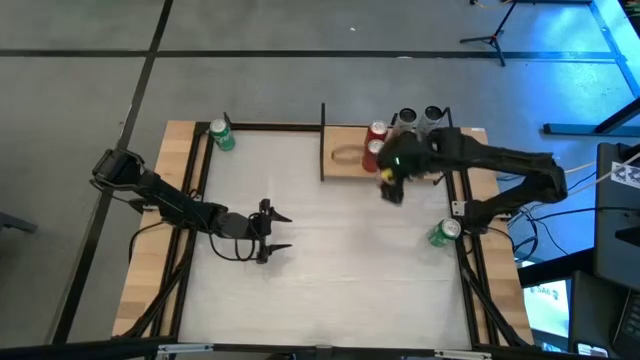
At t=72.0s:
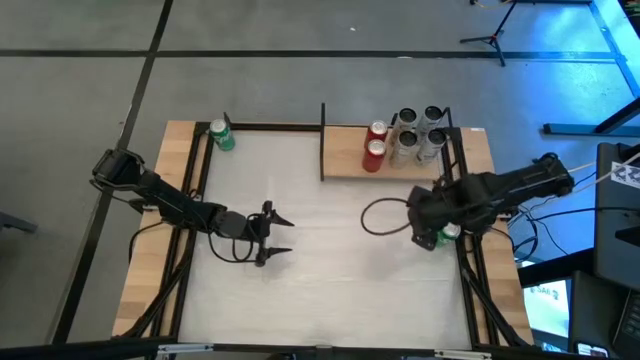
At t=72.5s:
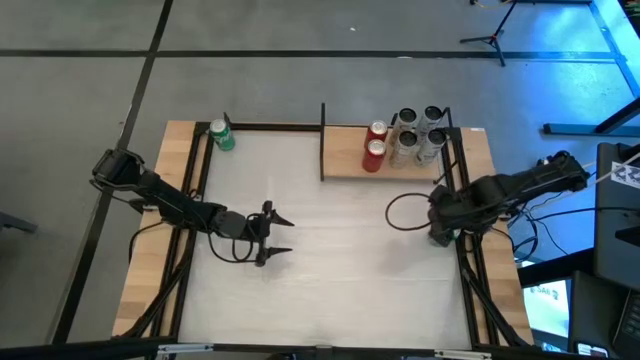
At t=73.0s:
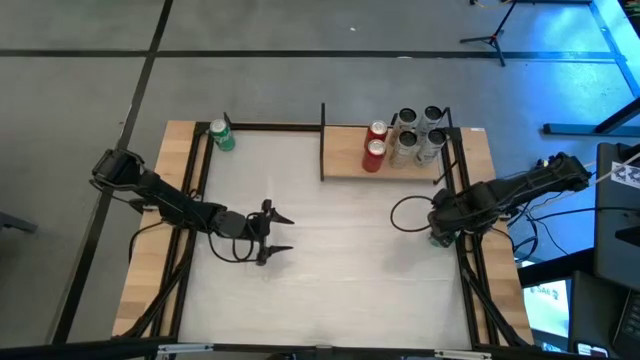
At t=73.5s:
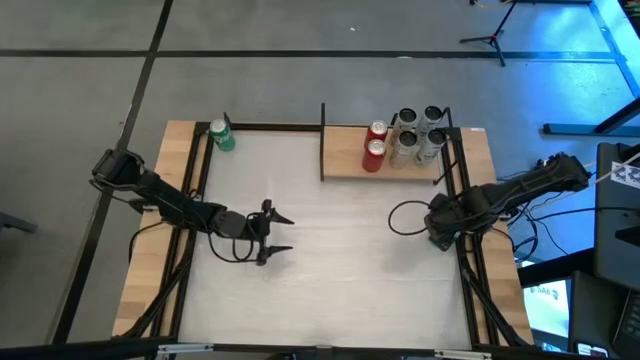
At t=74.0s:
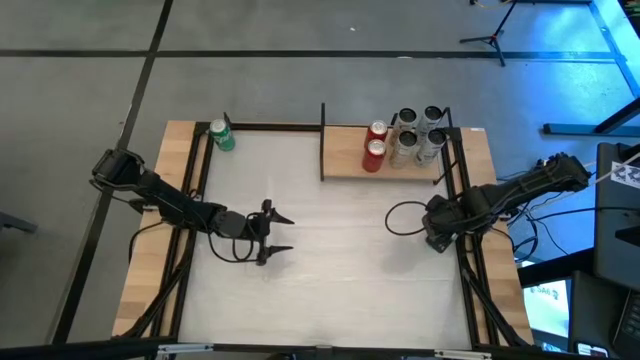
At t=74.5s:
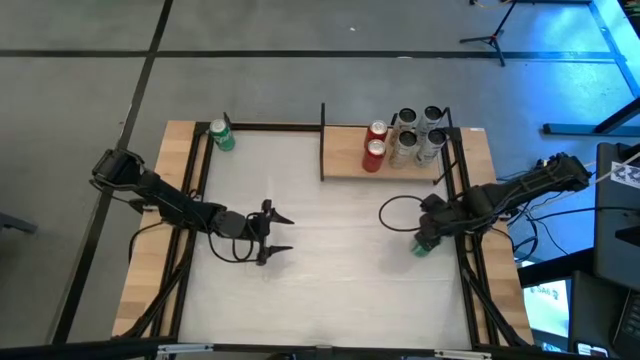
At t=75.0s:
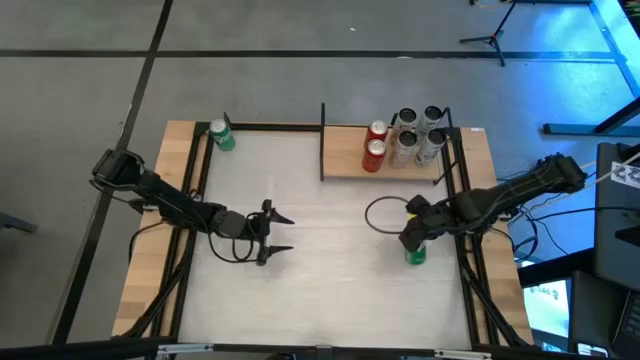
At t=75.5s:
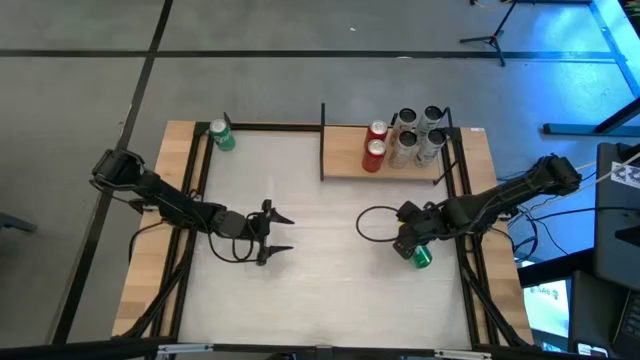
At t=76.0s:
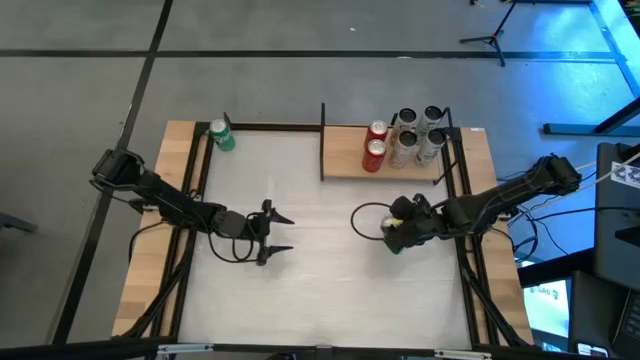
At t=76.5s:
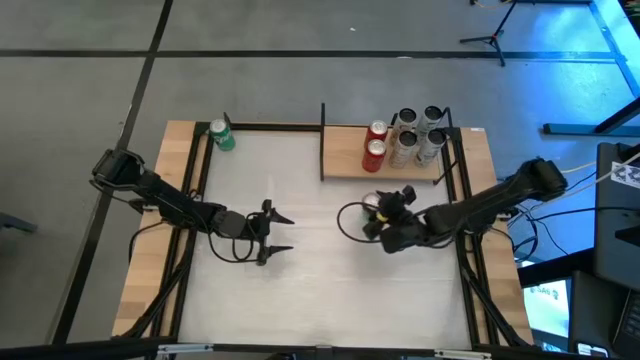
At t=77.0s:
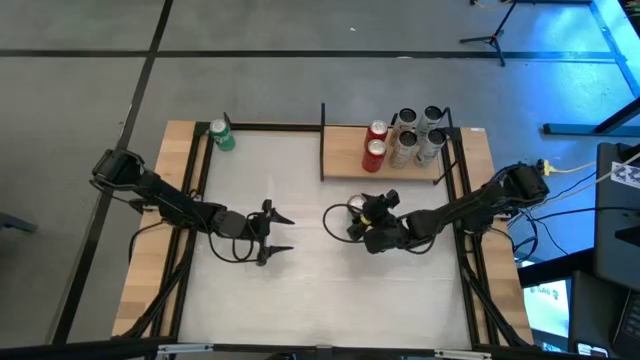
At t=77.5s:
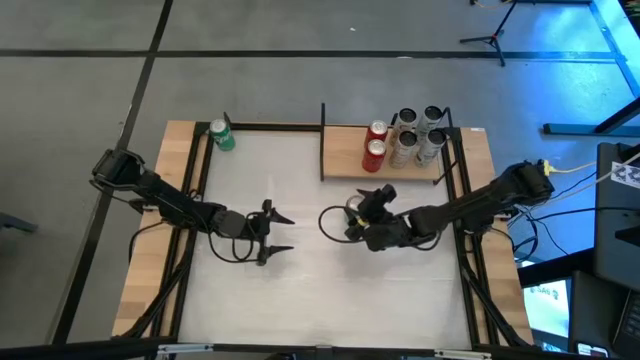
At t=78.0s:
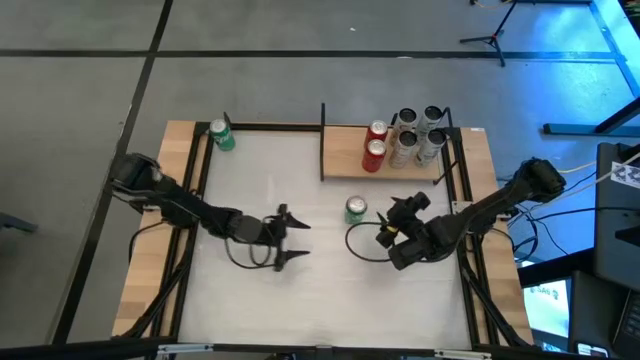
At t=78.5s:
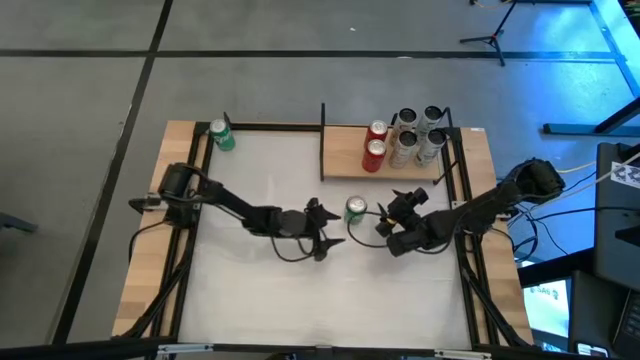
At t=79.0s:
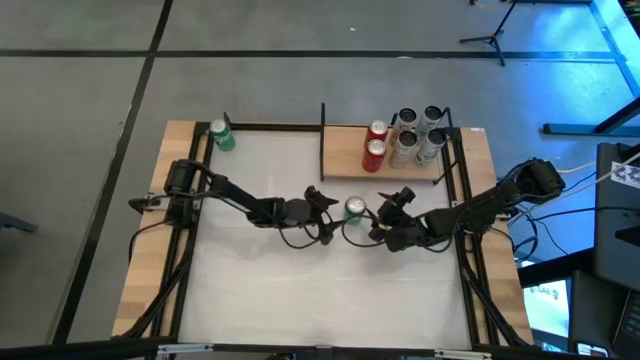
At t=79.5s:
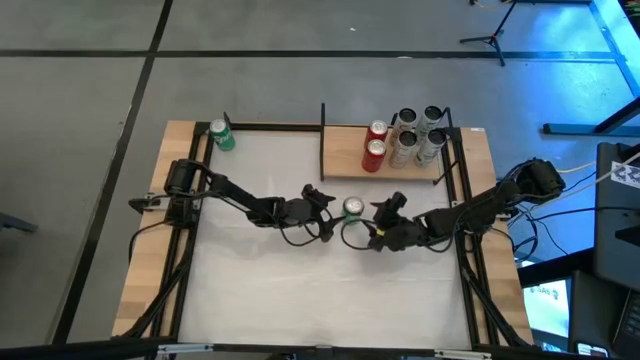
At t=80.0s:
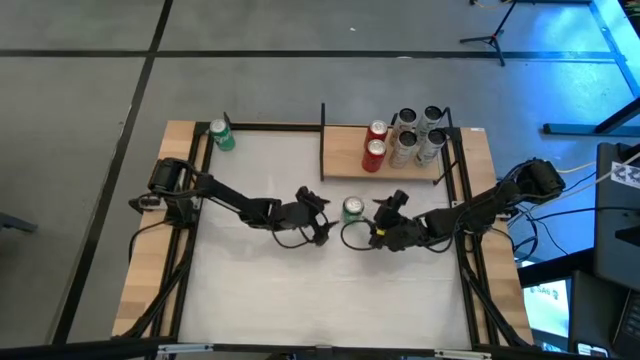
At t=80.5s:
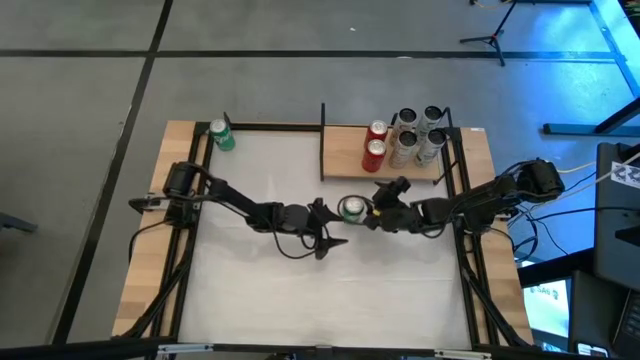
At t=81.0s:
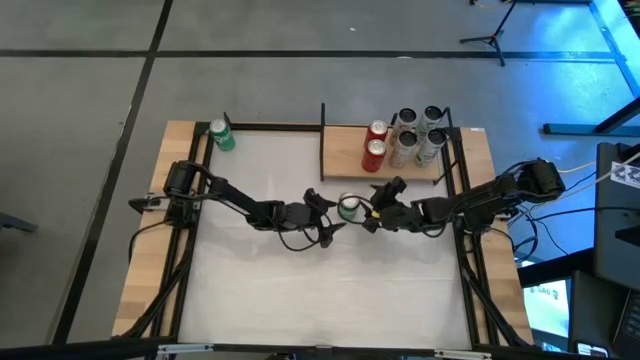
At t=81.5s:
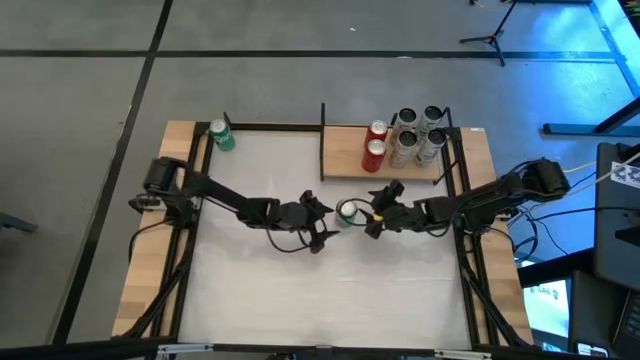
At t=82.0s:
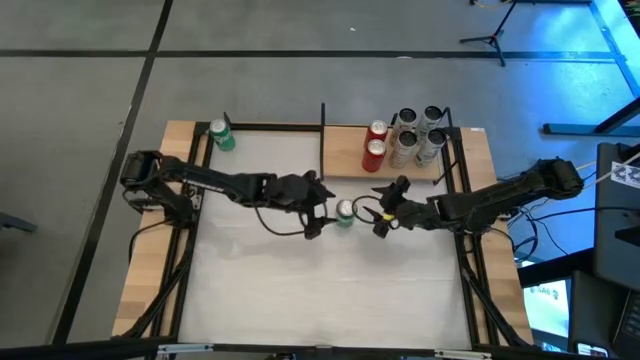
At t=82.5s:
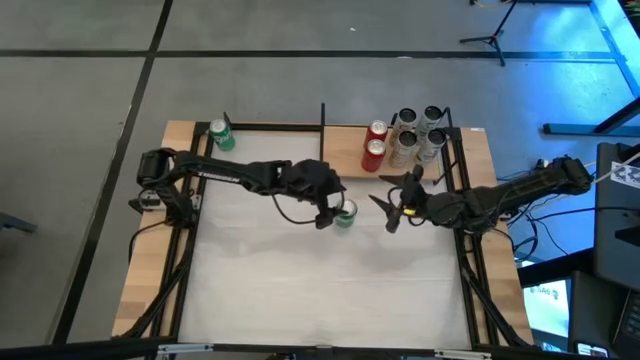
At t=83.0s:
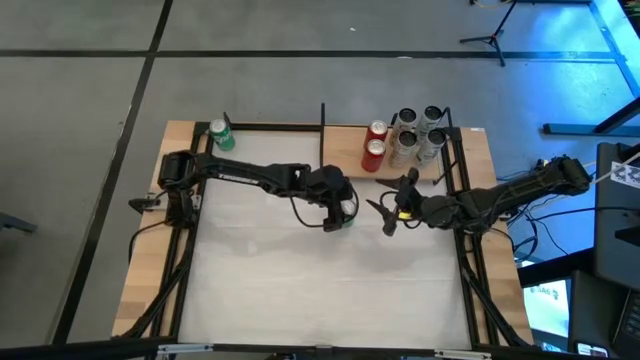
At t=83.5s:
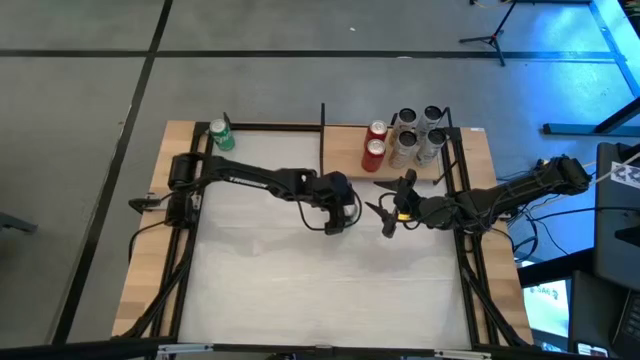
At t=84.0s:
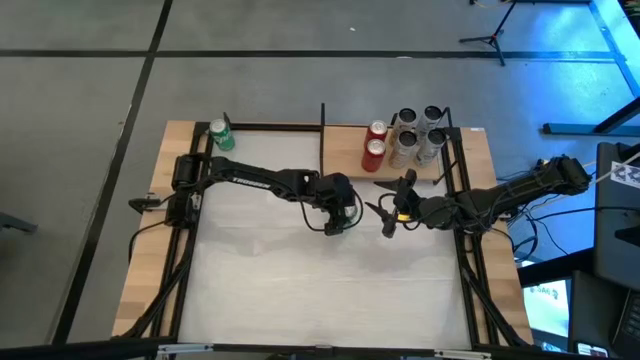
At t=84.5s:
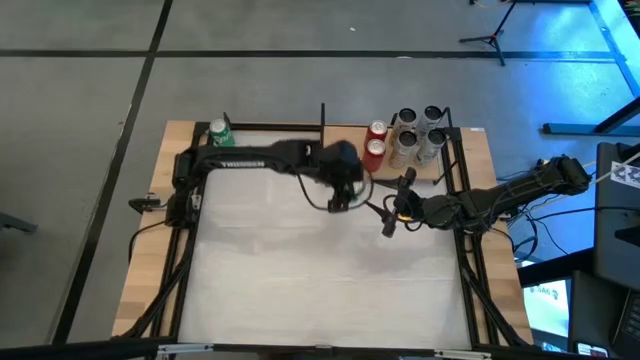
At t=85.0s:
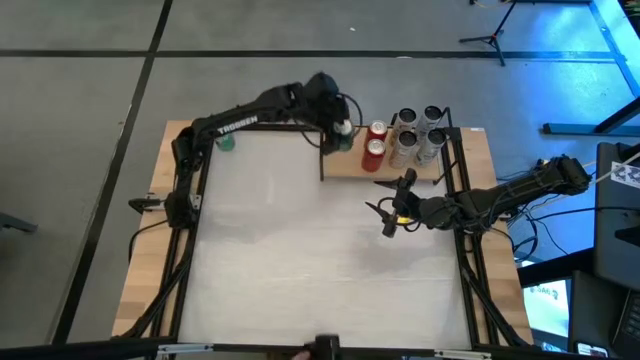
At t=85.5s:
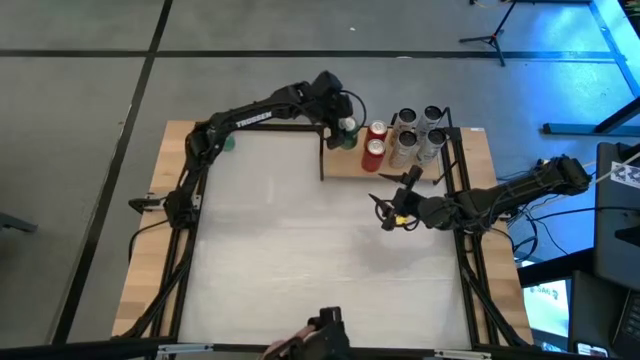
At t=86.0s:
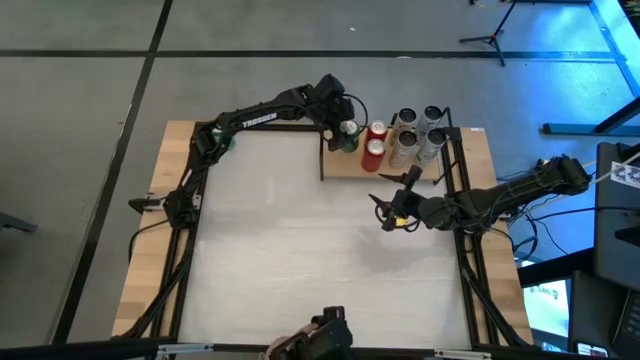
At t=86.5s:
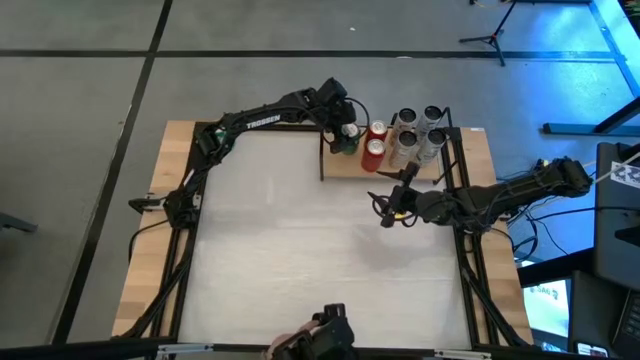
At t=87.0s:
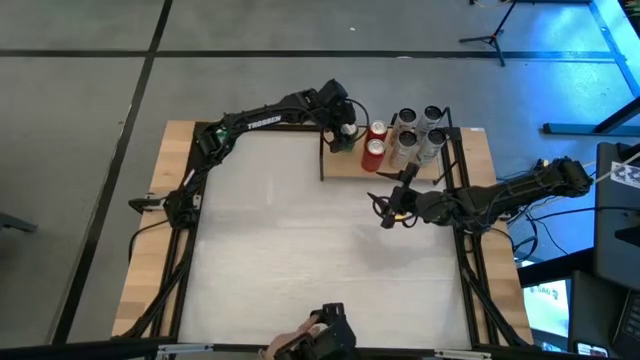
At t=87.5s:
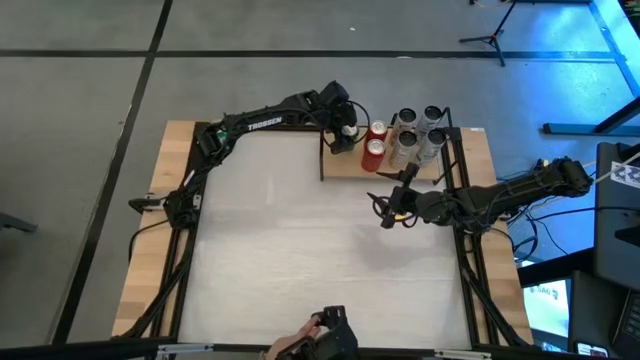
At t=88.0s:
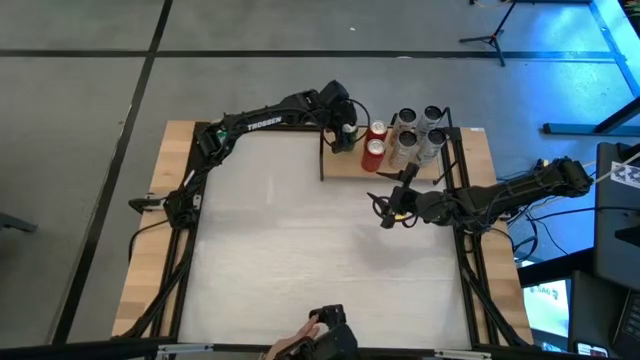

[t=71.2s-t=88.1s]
Task: Place canned beverage on shelf
Put the right green soda can on the shelf

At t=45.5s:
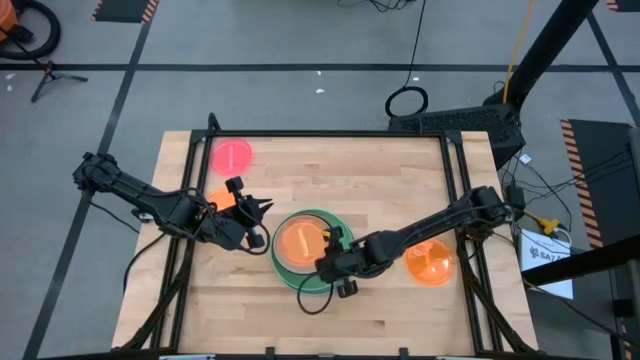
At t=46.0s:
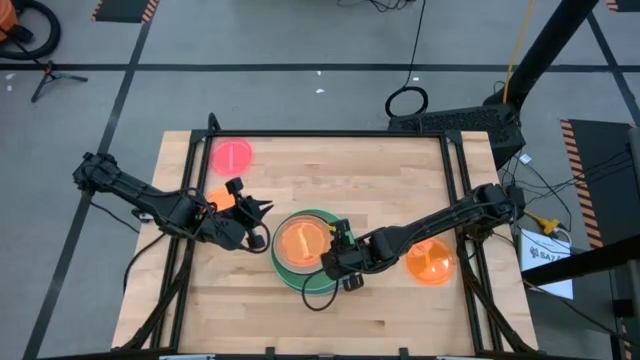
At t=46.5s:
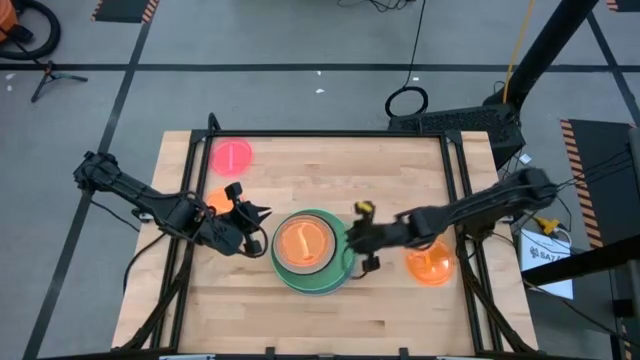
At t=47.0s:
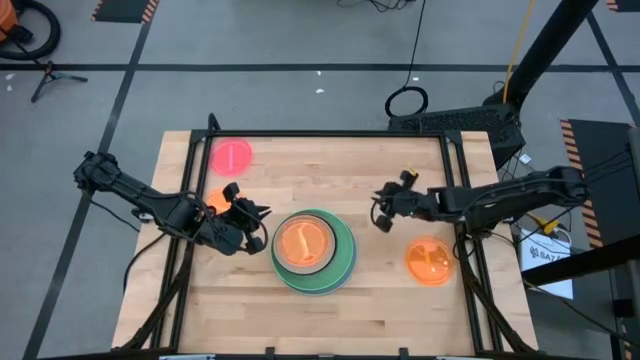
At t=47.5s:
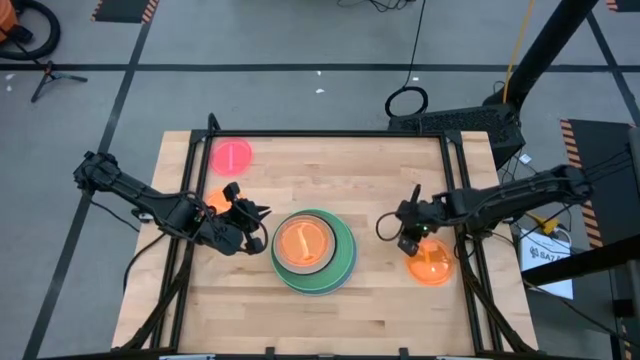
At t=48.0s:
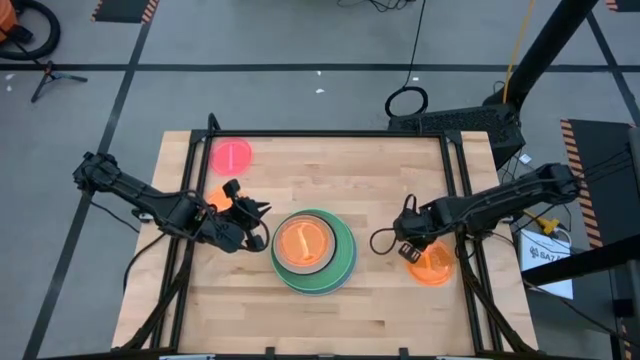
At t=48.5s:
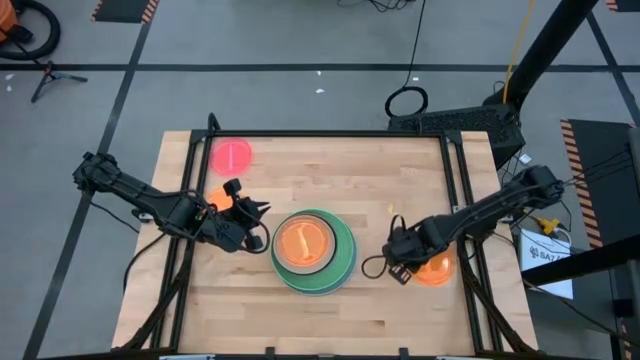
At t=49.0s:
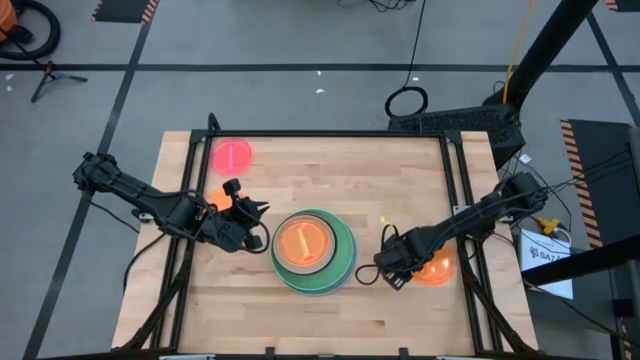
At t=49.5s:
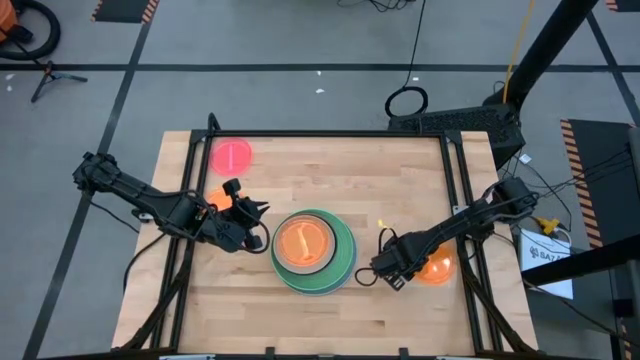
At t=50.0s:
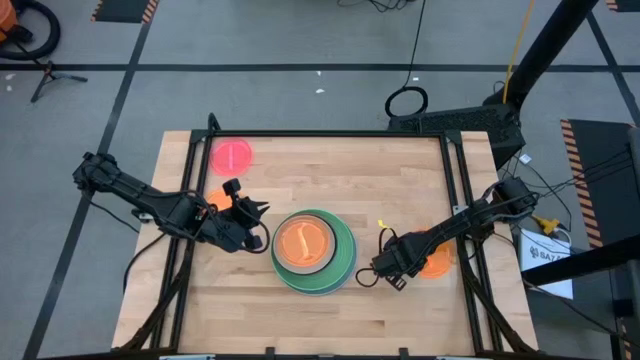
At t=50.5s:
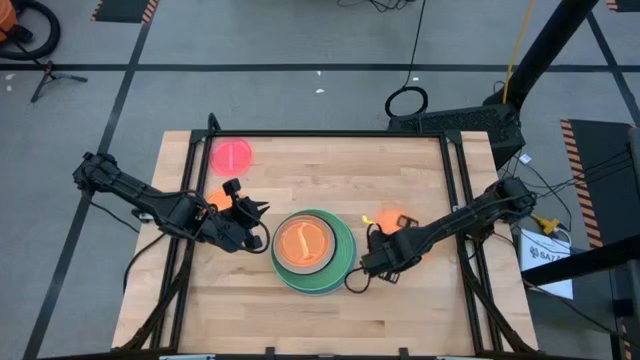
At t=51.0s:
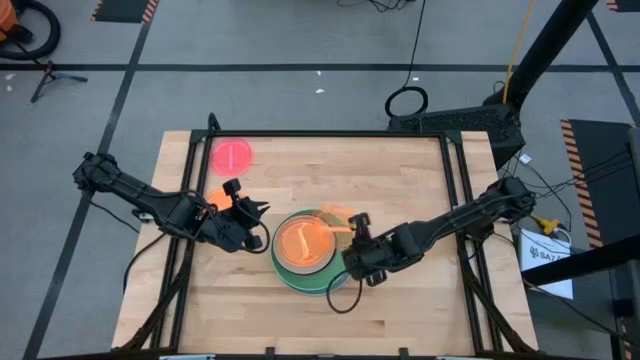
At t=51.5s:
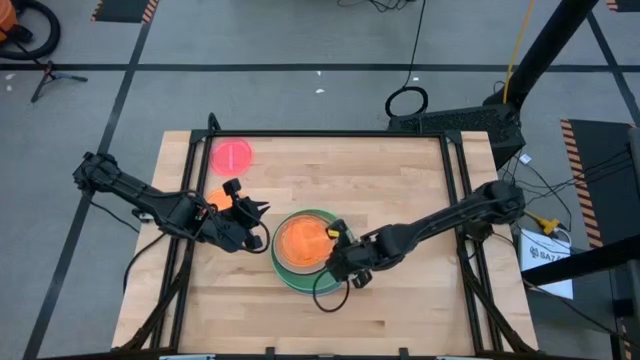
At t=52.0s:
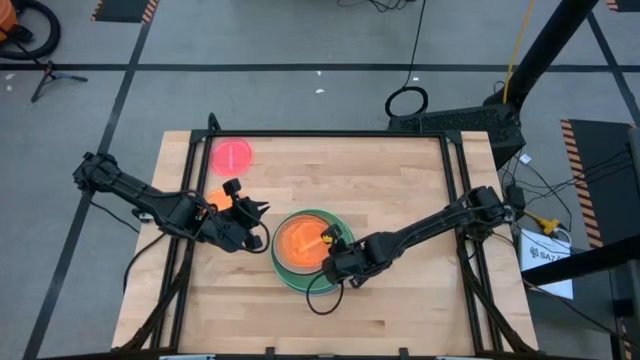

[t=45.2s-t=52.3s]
Task: Stack plastic plates
Stack the right orange plate on the orange plate
